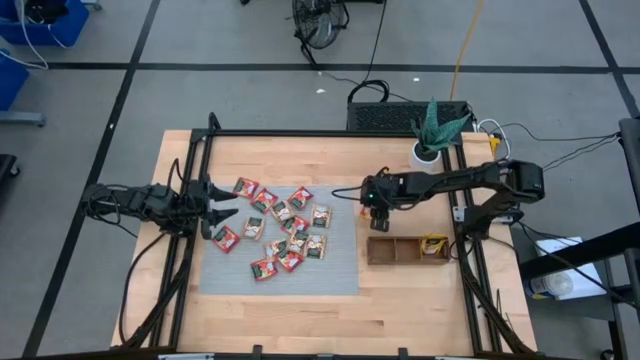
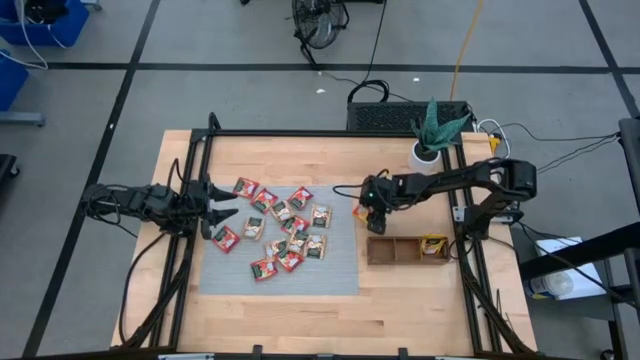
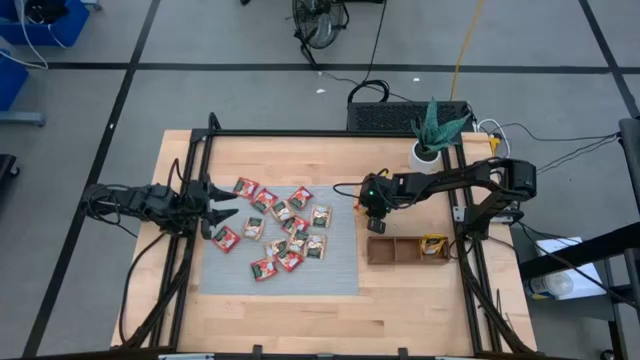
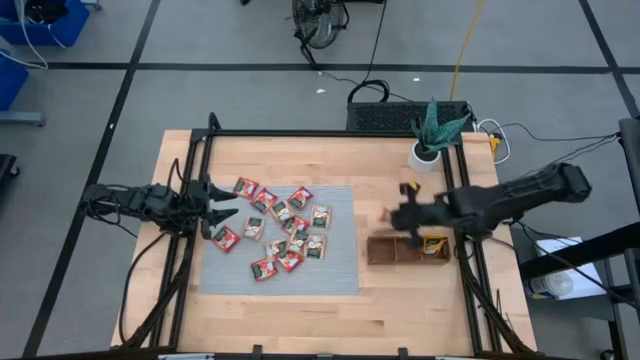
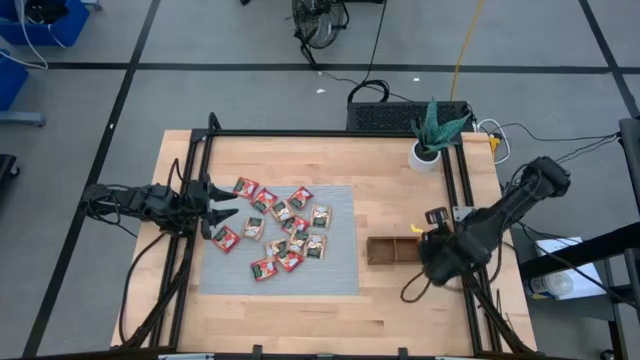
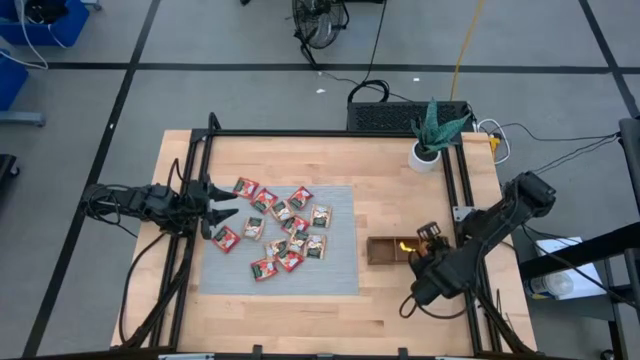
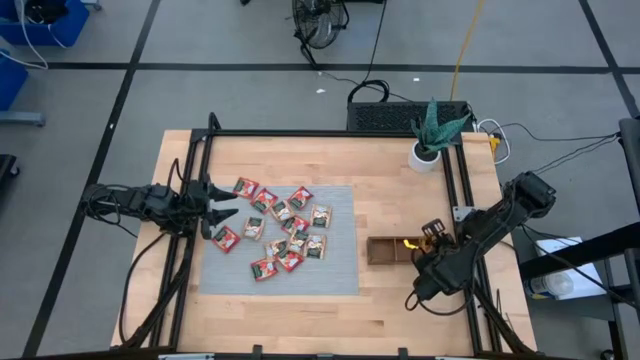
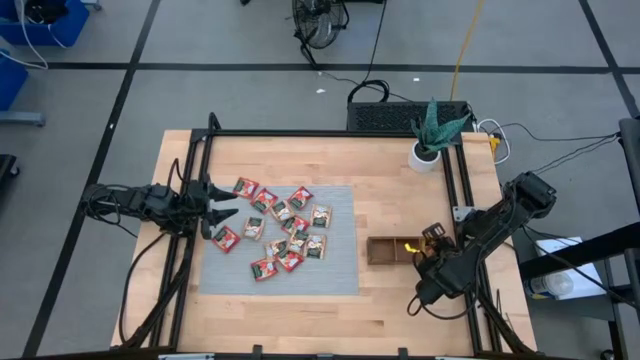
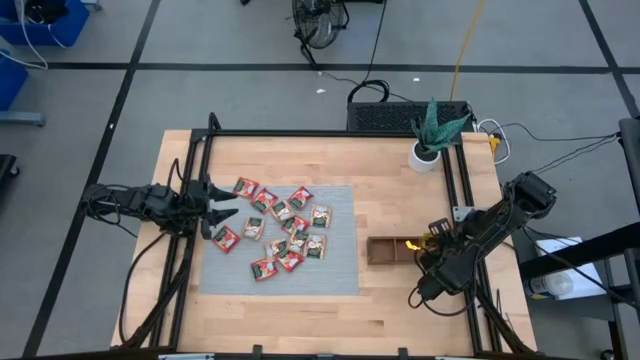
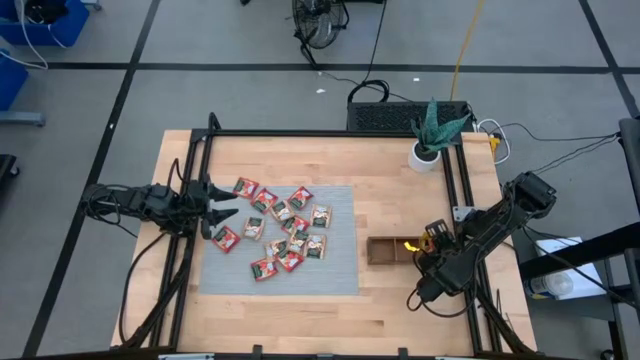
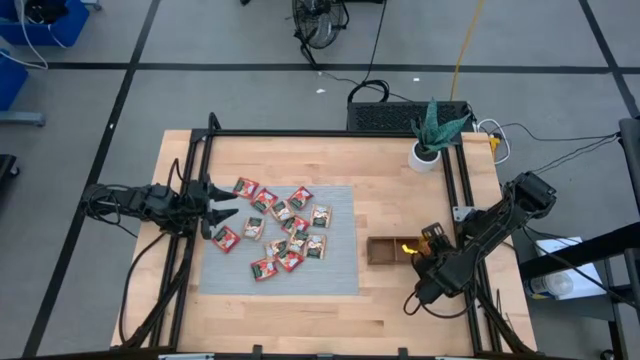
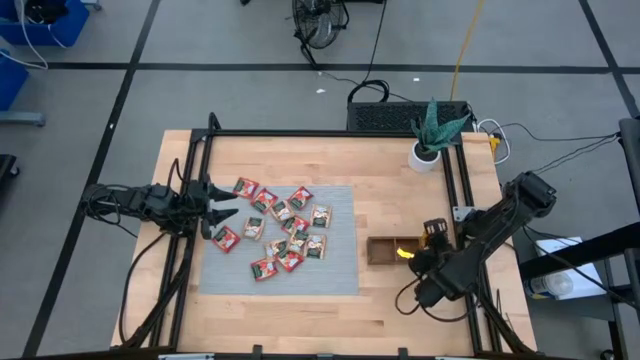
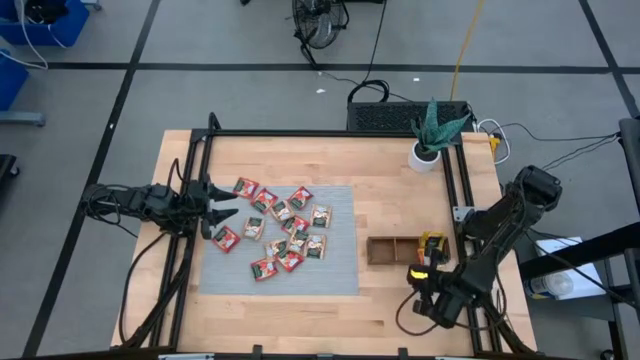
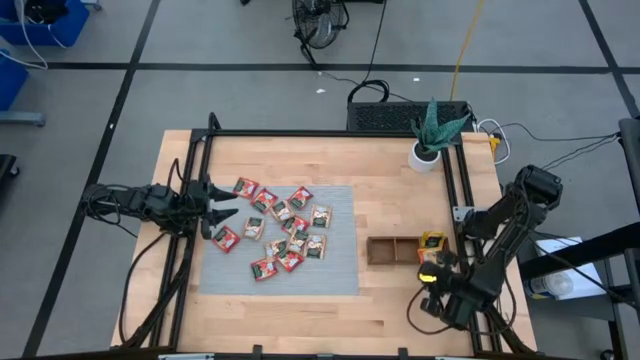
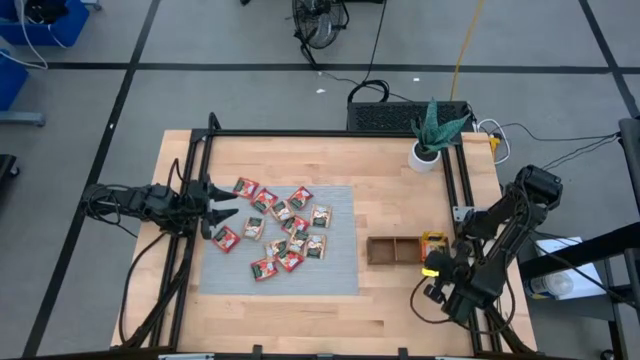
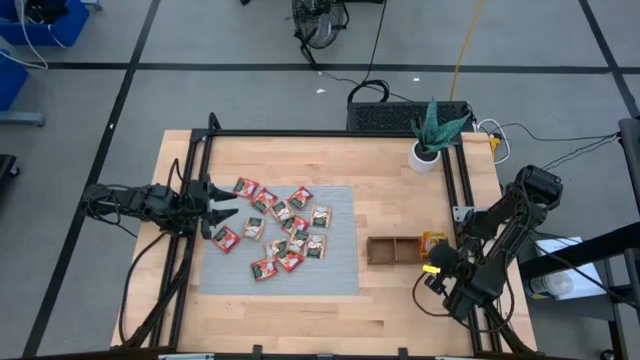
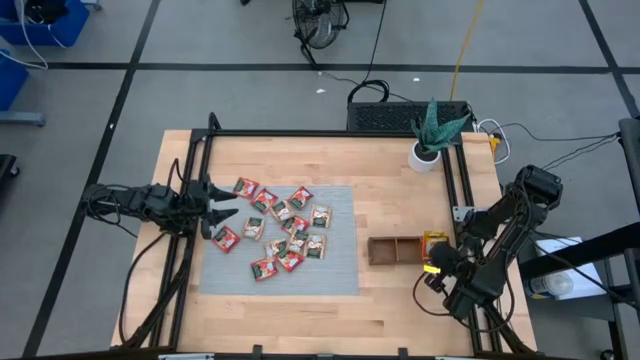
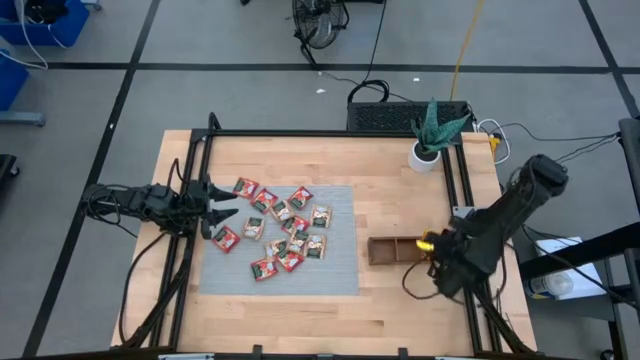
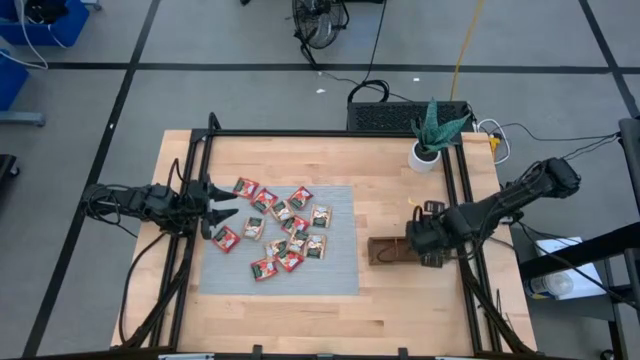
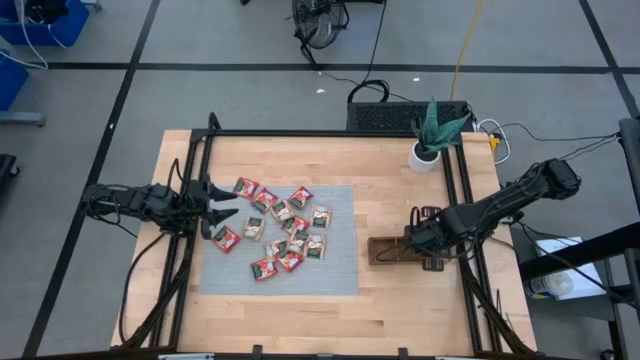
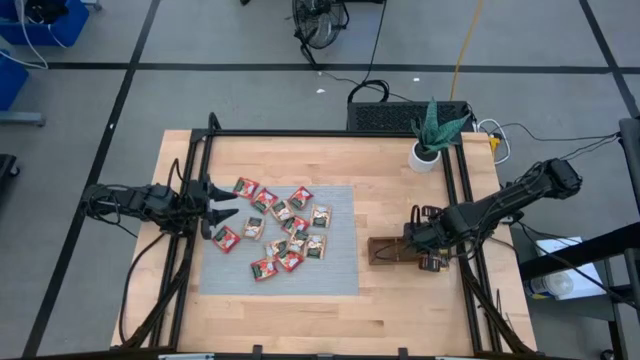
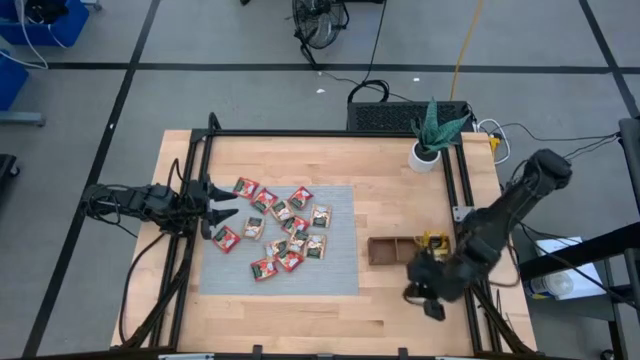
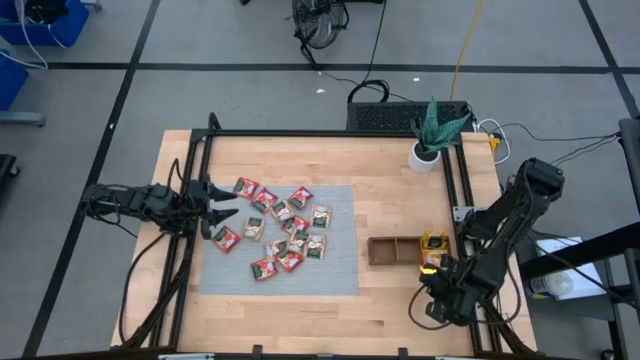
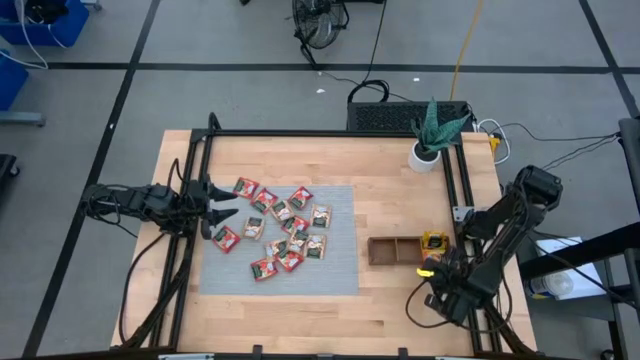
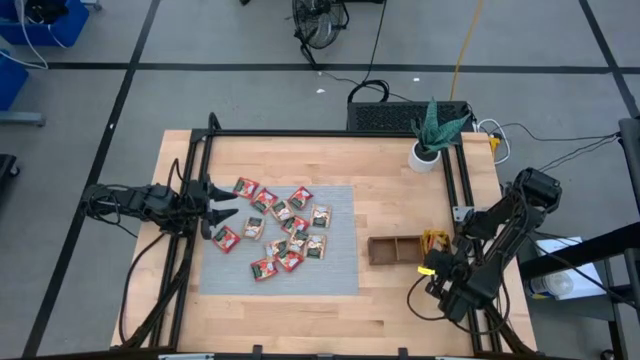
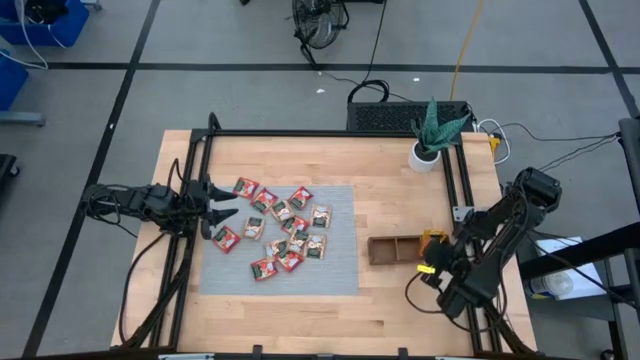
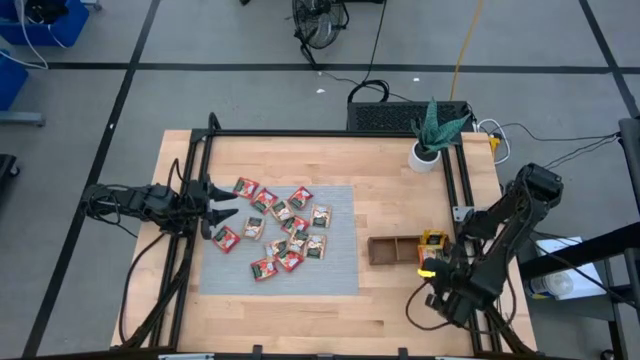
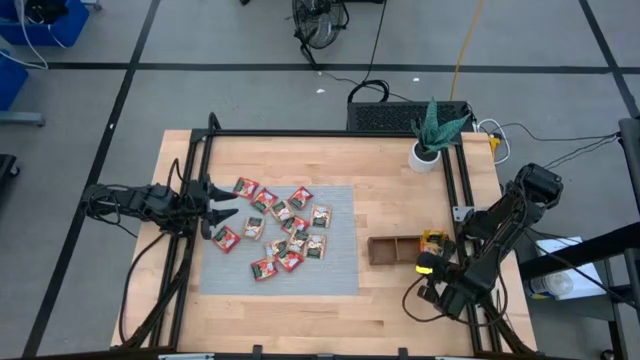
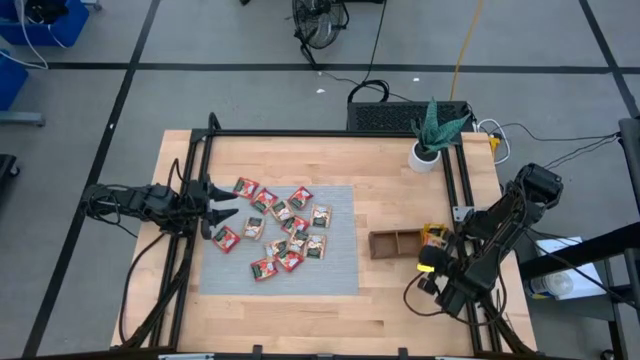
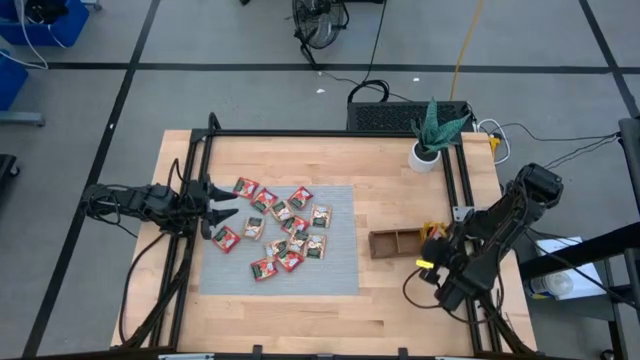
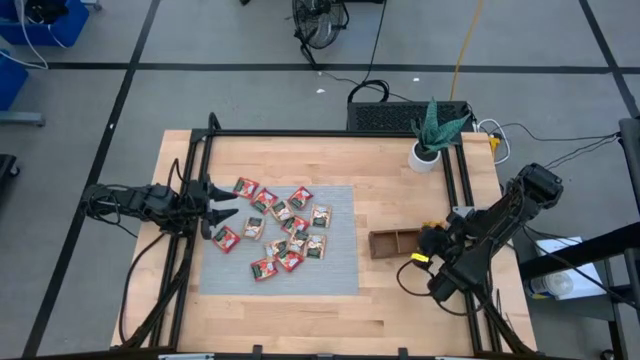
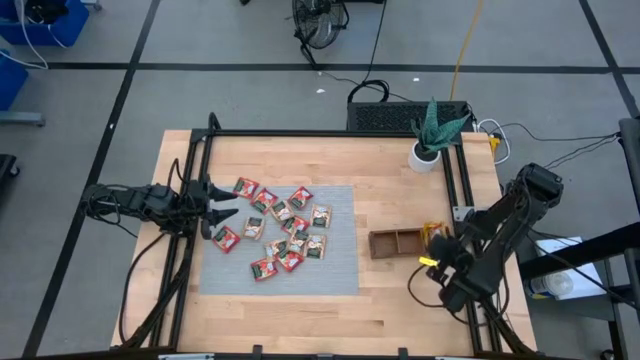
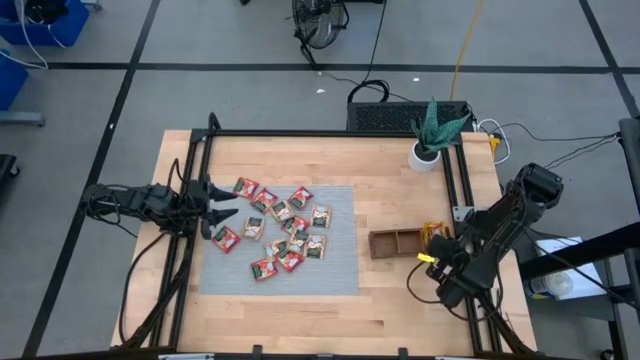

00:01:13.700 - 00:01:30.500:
Task: Pick & Place Tea
Put the yellow tea bag into the right section of the wooden organizer

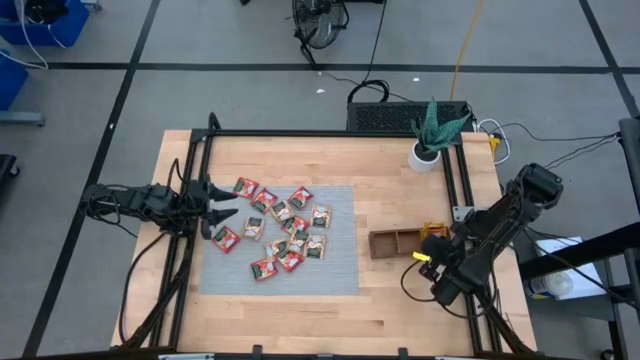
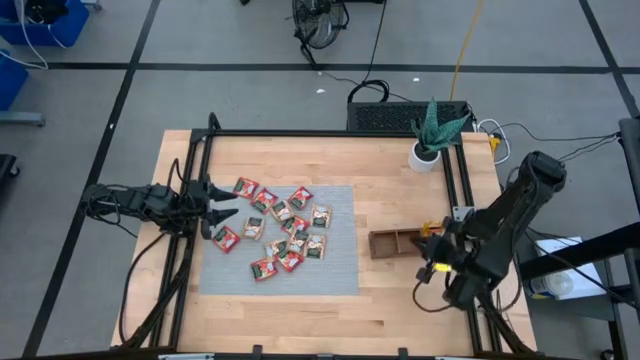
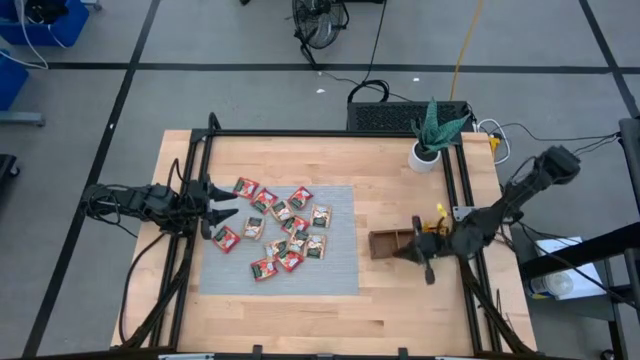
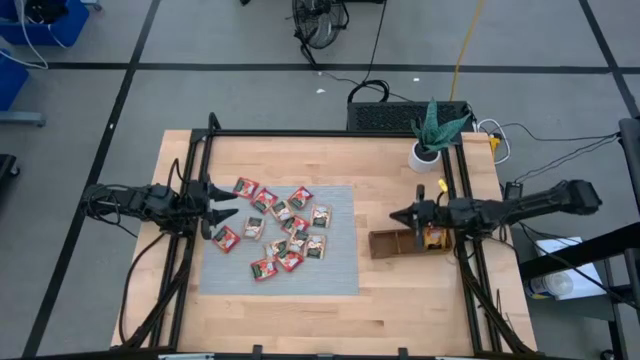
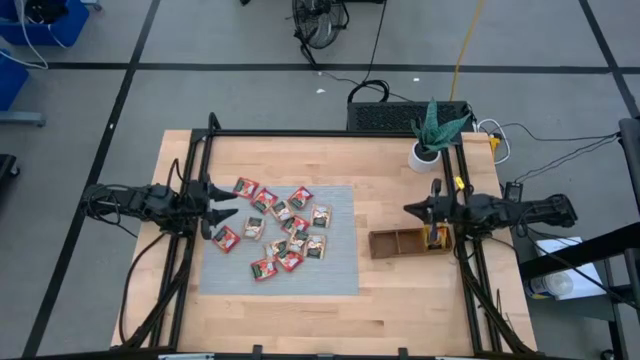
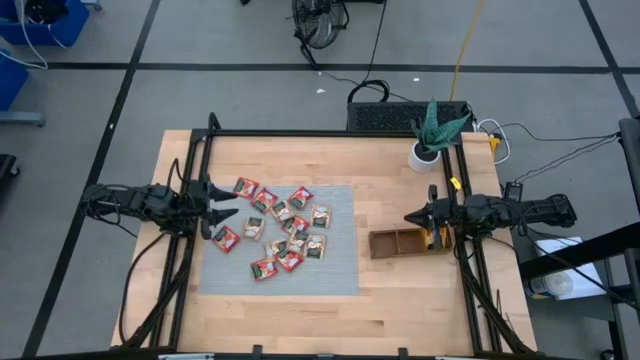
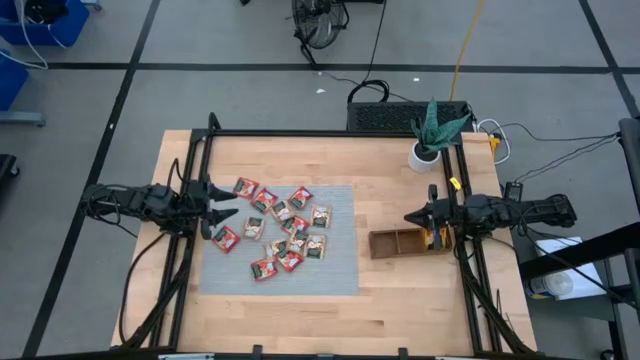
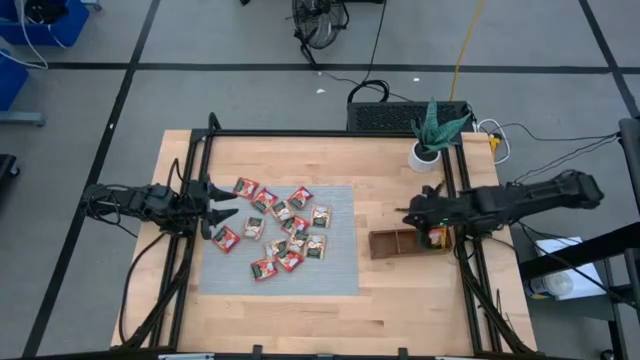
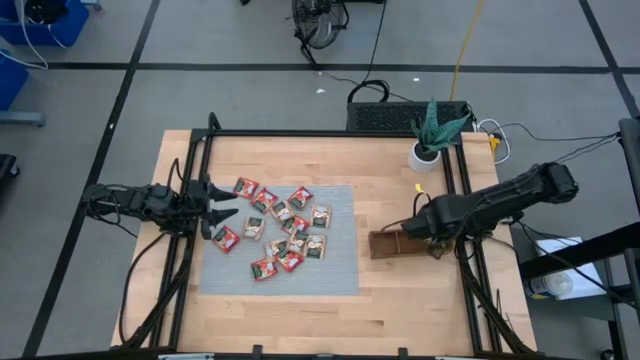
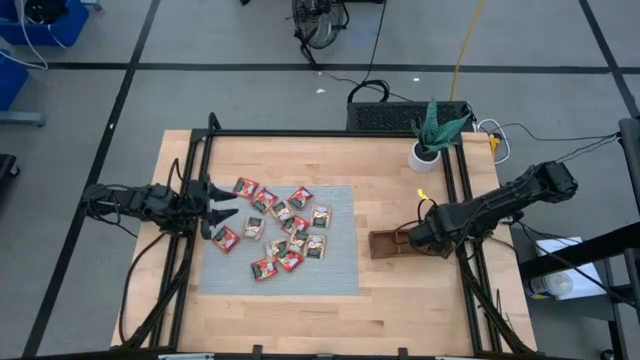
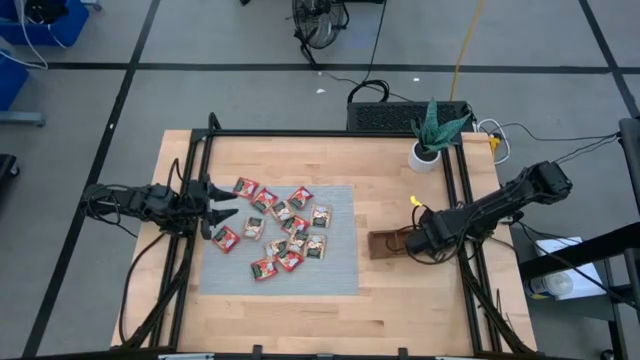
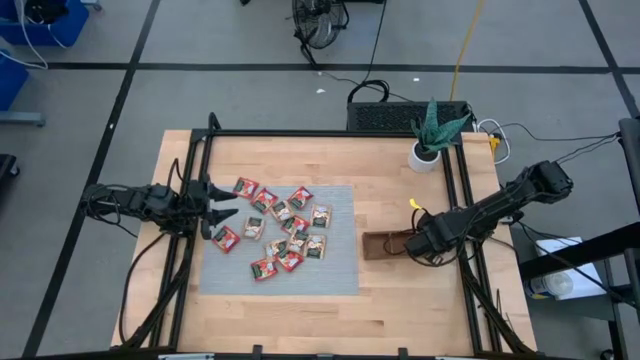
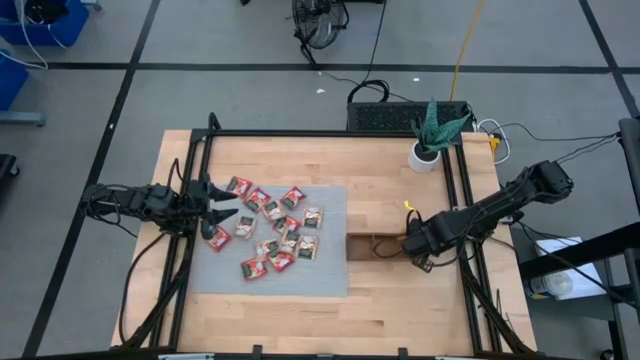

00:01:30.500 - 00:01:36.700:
Adjust the wooden organizer on the table
